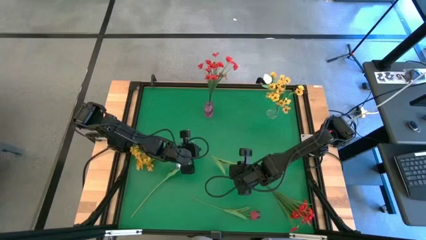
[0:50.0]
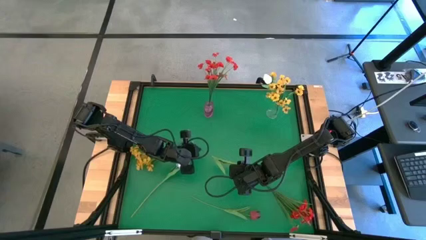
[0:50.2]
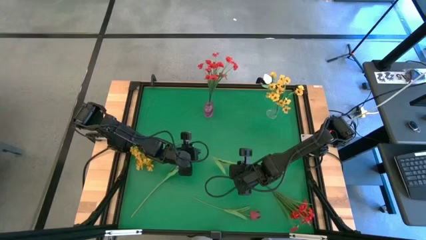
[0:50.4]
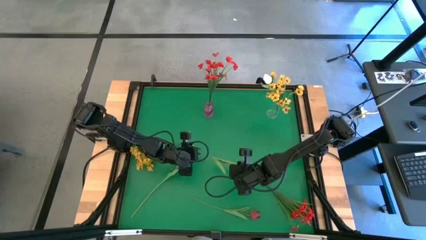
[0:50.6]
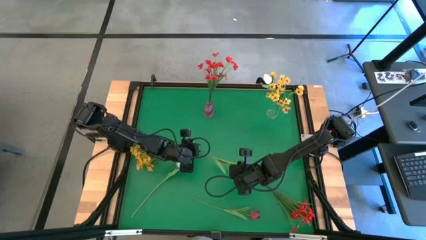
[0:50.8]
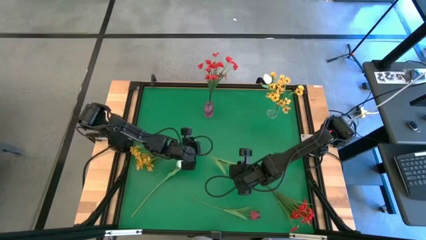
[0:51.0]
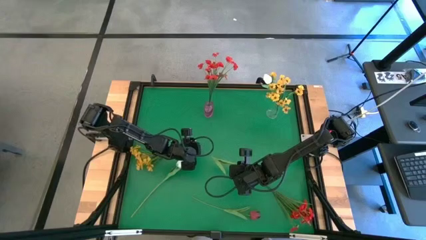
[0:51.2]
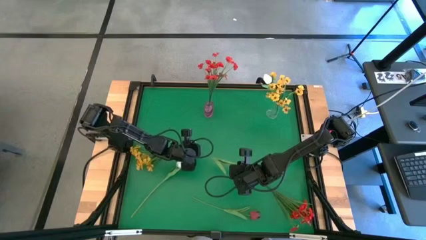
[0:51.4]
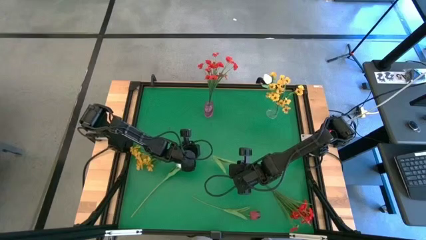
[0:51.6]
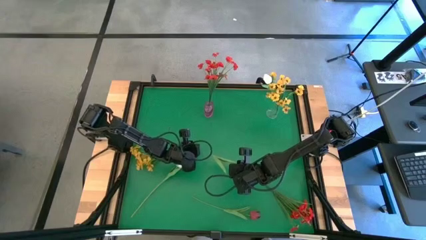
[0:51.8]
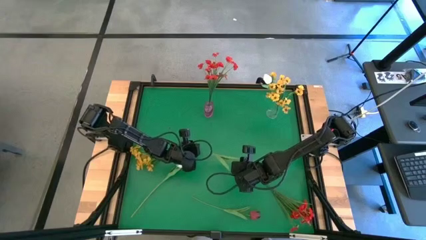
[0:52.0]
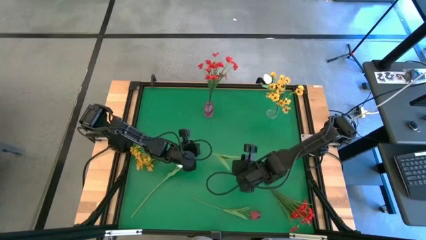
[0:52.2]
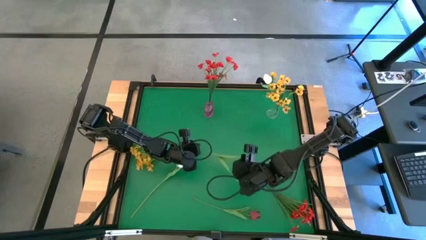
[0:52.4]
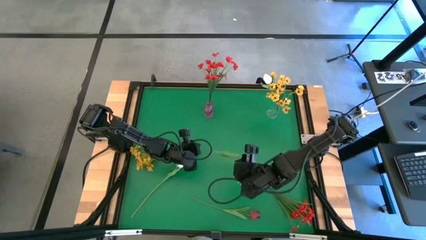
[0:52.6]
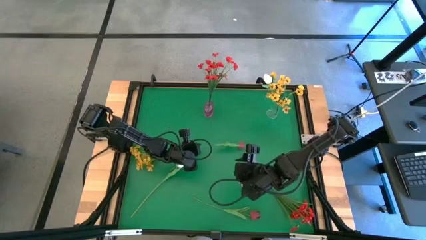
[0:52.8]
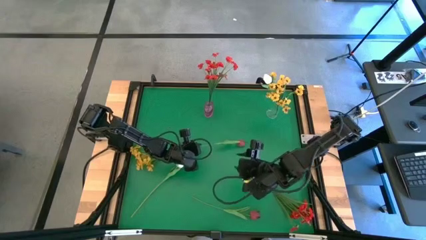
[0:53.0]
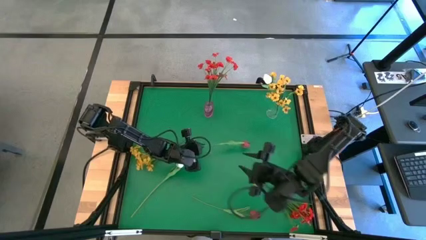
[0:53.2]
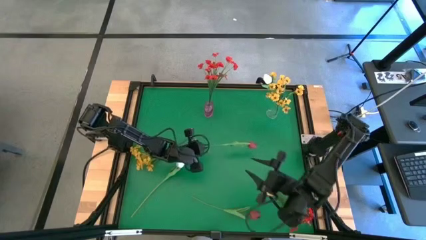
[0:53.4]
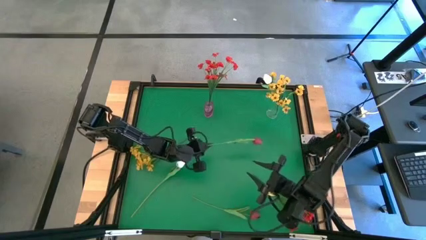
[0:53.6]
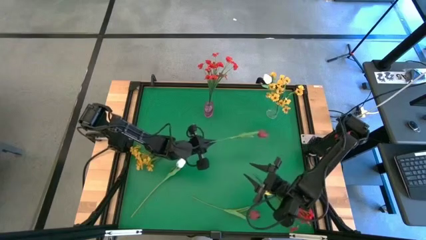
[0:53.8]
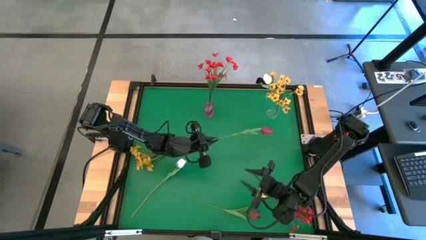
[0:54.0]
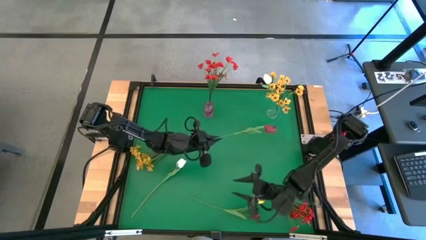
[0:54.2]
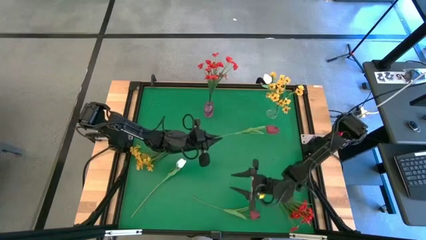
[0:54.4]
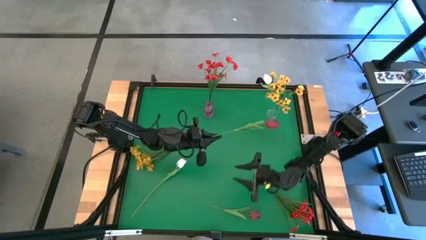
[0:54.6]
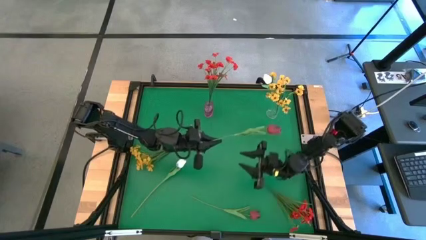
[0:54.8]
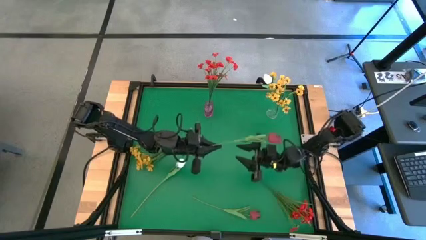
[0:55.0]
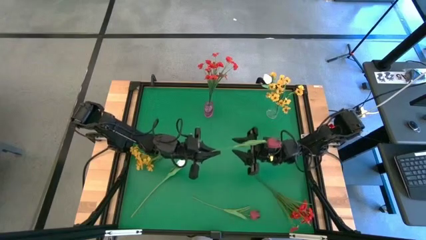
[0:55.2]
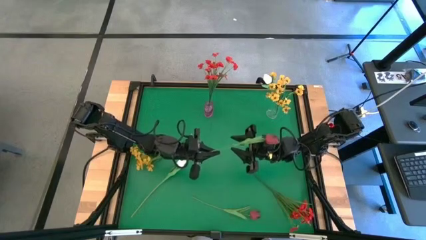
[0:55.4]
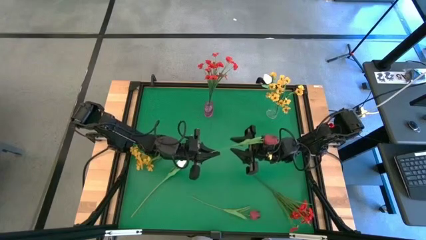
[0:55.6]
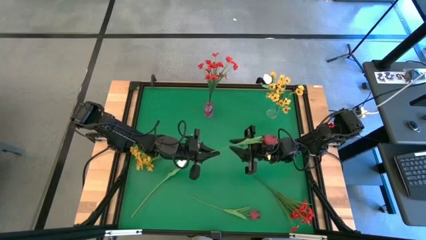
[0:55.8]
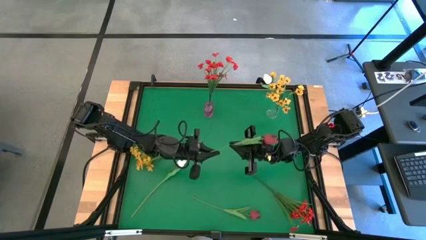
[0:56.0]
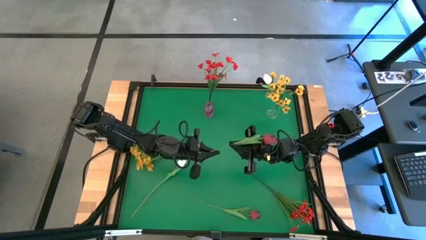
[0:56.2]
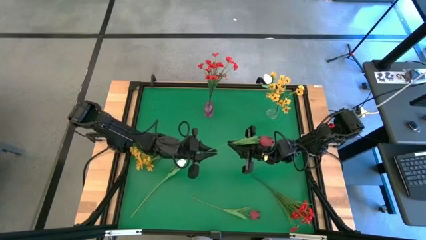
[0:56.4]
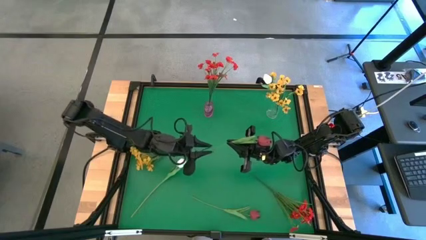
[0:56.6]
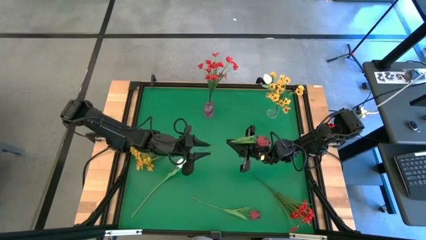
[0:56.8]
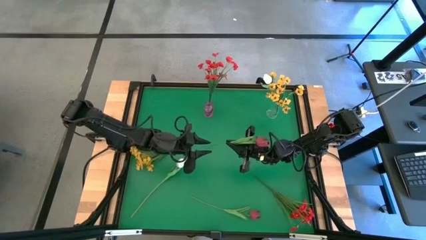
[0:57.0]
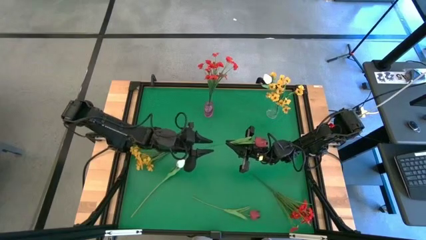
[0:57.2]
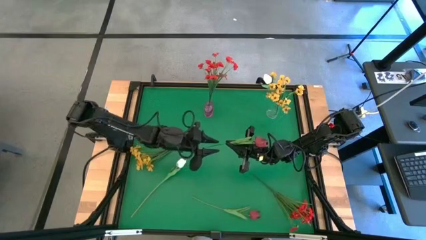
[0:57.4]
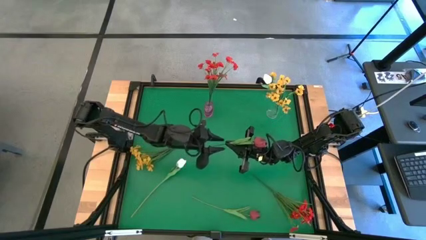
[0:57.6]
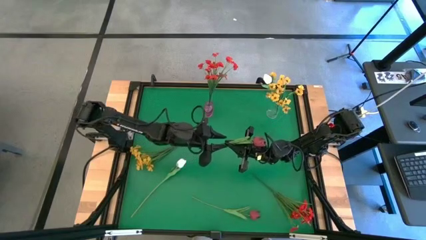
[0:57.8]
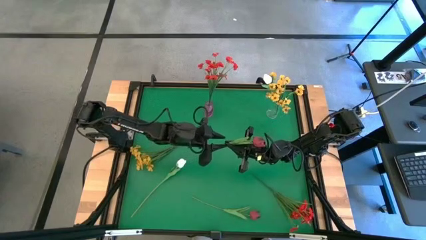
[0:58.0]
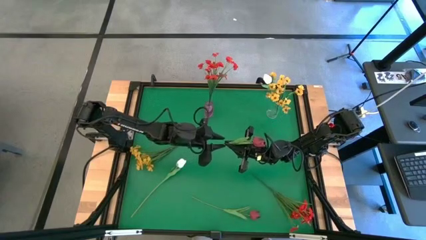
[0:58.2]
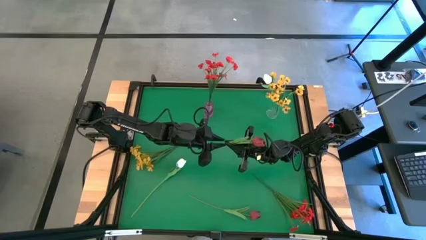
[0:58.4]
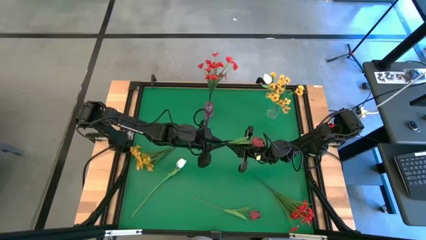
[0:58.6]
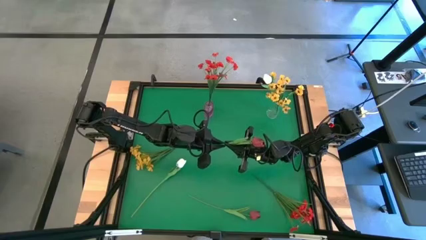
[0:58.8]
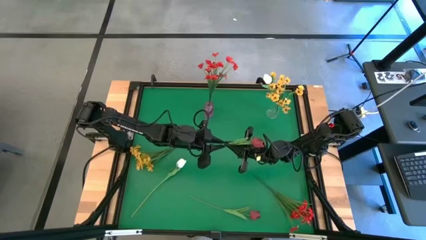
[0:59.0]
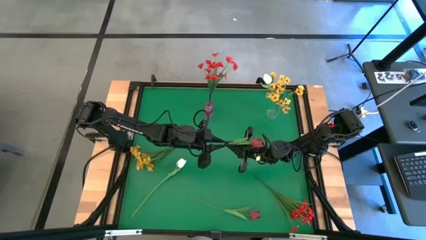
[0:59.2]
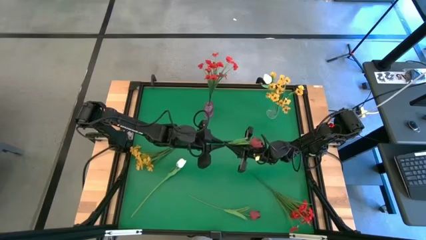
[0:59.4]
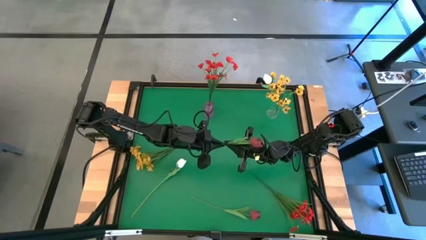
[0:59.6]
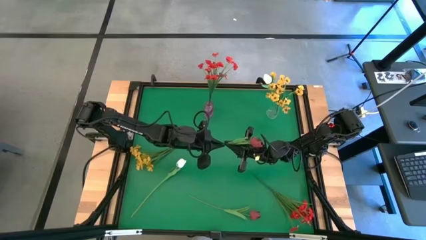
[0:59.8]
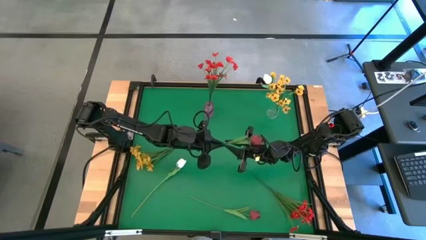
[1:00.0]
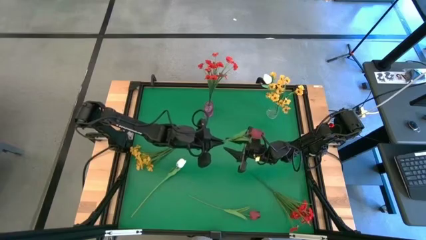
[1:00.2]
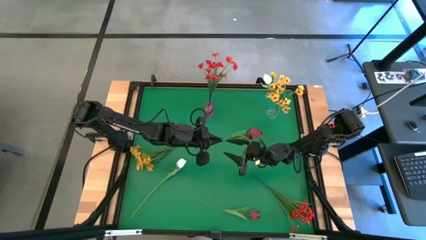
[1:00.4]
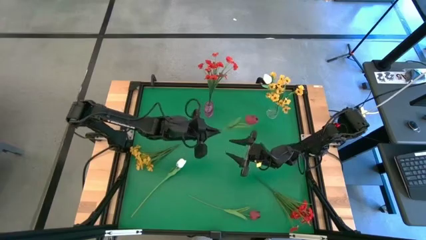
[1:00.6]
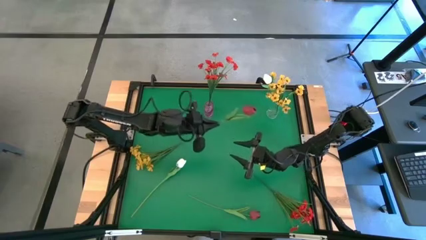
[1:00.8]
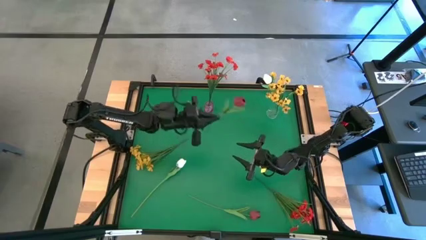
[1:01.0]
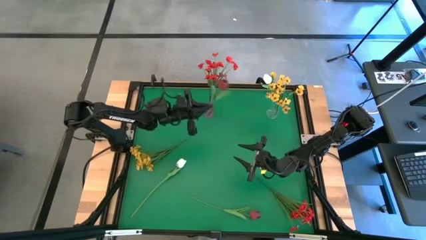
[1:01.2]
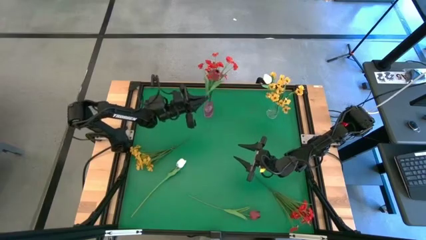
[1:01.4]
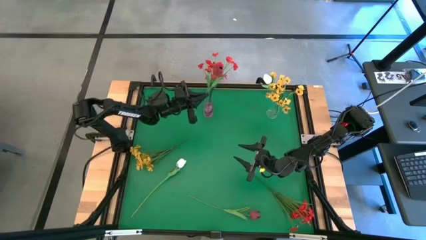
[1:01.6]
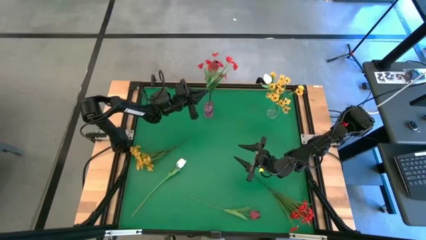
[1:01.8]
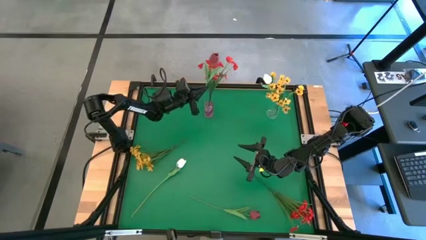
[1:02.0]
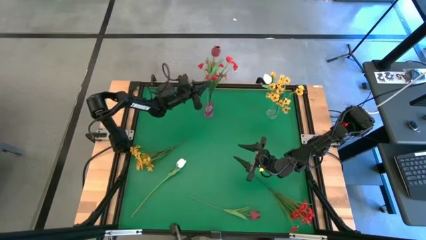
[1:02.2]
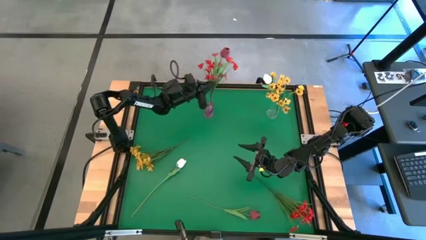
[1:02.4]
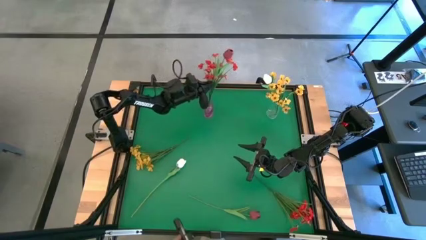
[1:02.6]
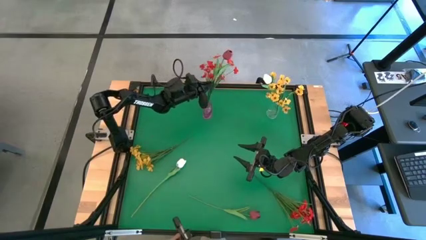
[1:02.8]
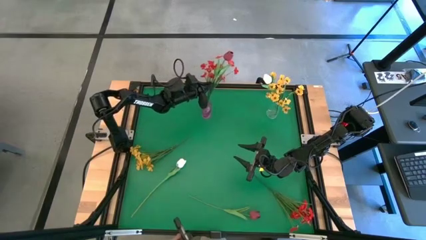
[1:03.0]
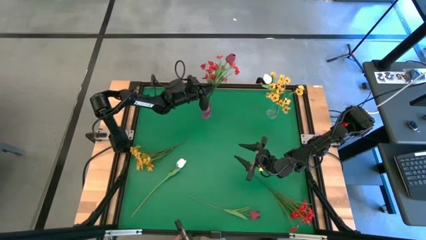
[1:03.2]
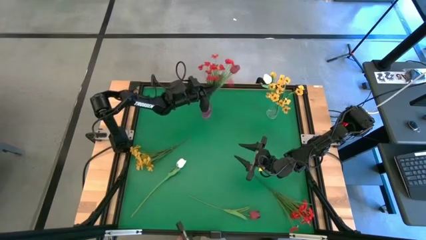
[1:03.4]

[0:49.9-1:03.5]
Task: Sort flowers into vase by color
Put the top red flower into the pink vase

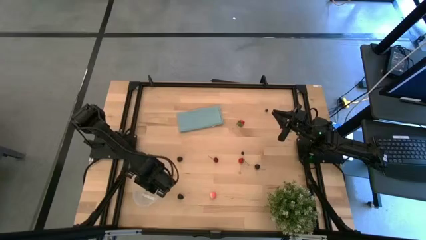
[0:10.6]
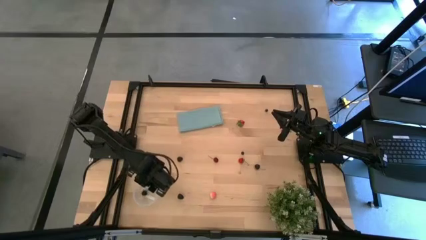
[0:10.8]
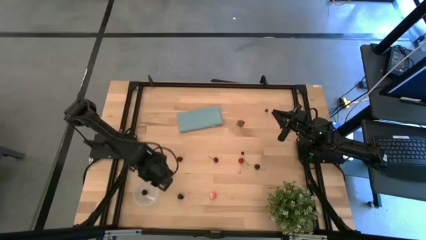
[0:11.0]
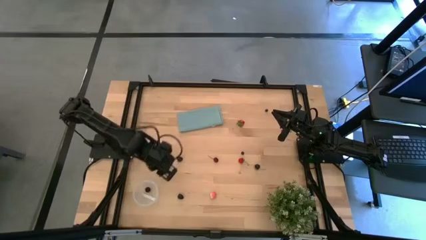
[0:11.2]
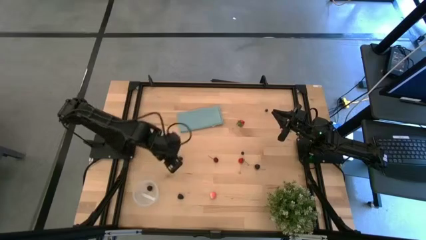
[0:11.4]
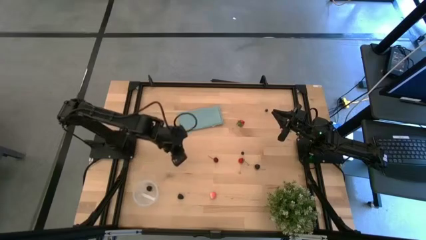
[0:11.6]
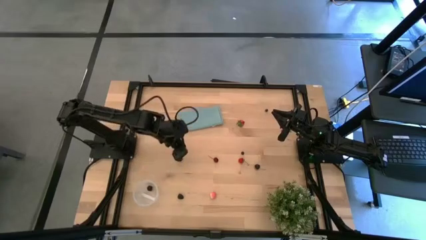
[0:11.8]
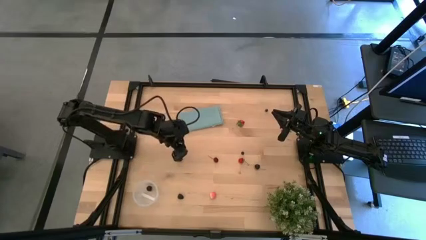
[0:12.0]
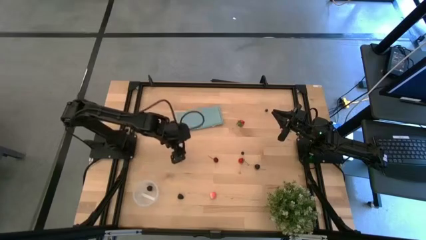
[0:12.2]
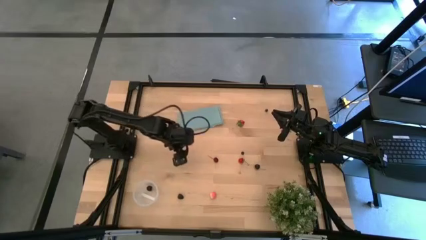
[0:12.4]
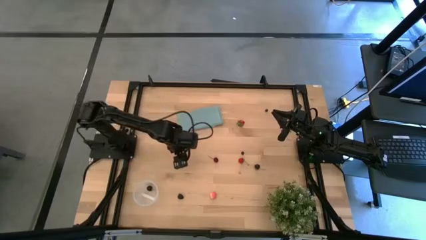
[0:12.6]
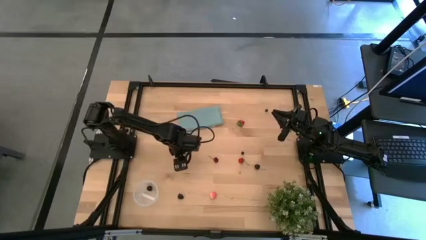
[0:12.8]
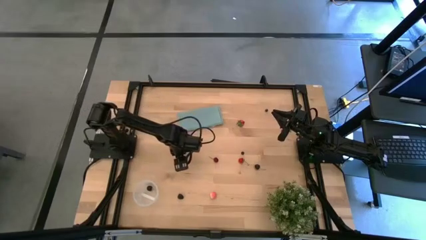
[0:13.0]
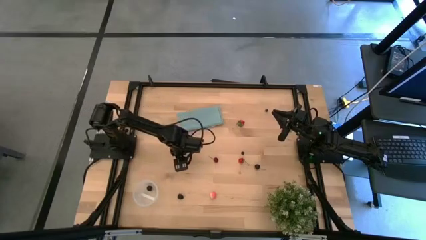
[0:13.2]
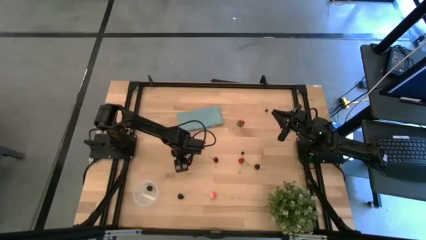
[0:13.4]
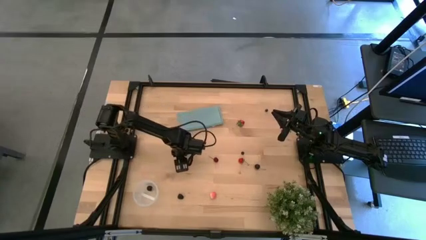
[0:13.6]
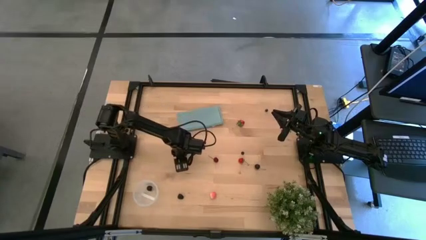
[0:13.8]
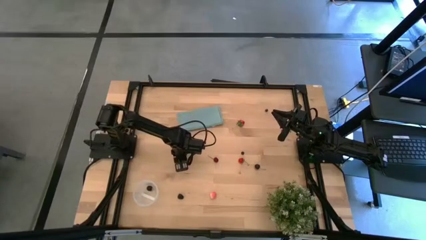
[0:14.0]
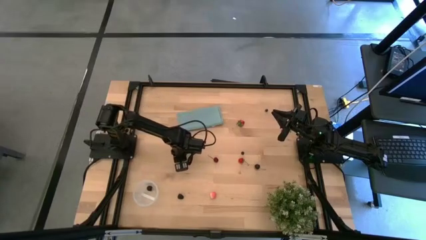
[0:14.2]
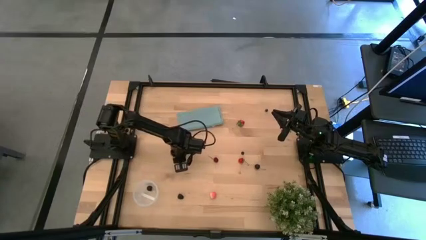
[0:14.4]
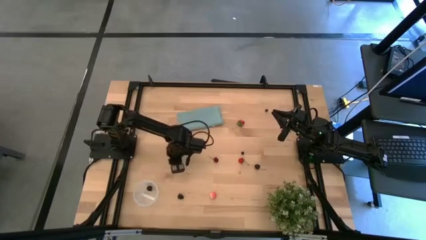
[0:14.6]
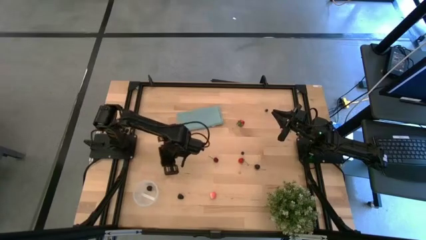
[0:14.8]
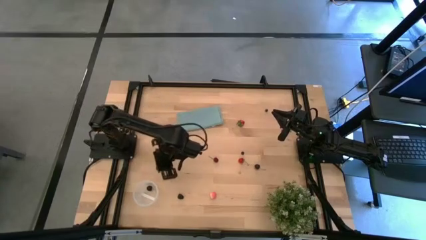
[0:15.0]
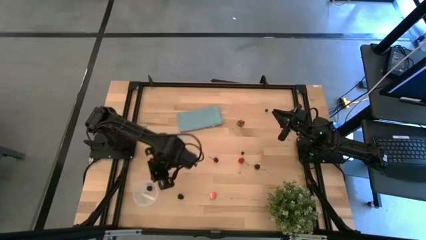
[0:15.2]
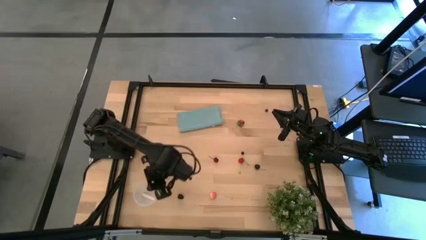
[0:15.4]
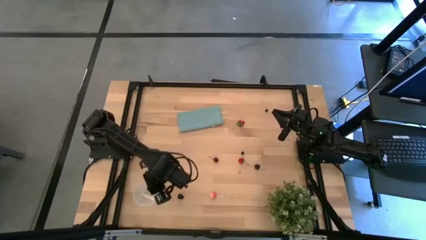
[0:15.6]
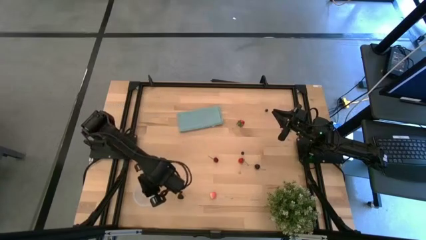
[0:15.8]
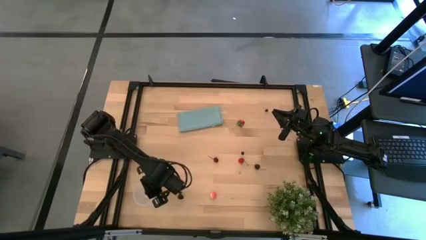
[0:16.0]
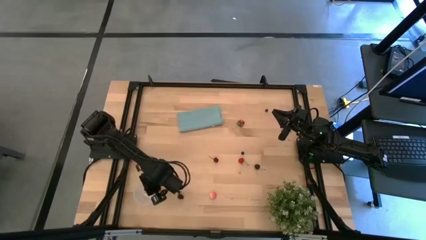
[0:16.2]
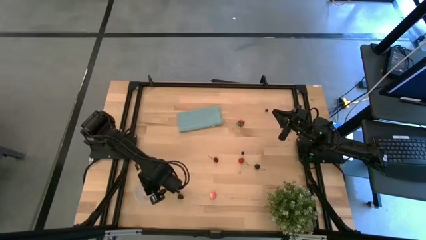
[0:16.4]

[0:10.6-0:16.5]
Task: Pick and placing Produce into tupperware
Put the top blackberry into the transparent container
